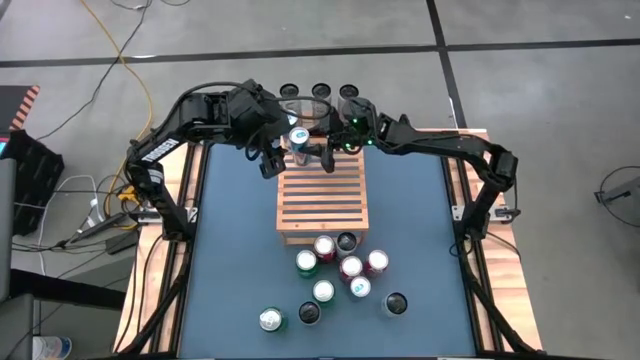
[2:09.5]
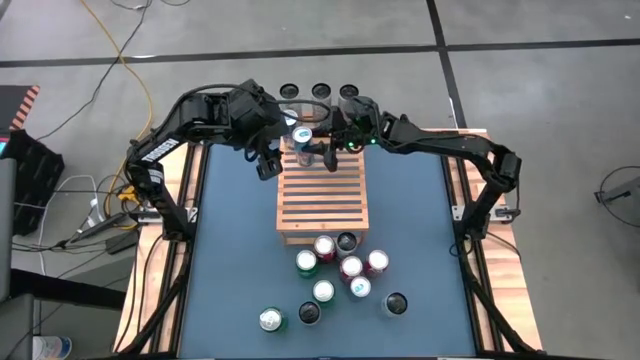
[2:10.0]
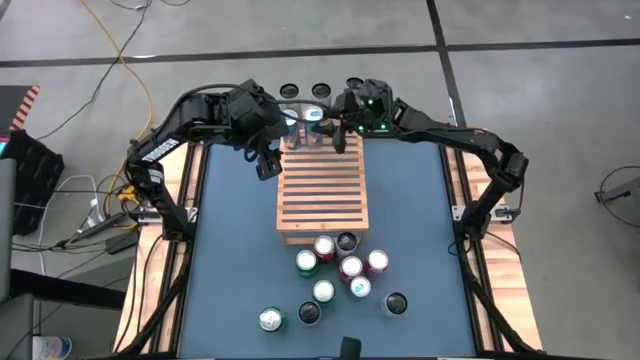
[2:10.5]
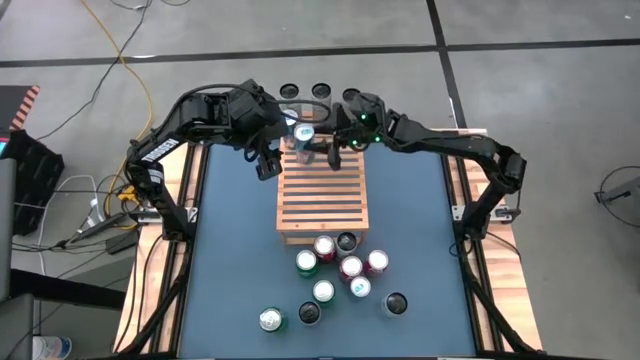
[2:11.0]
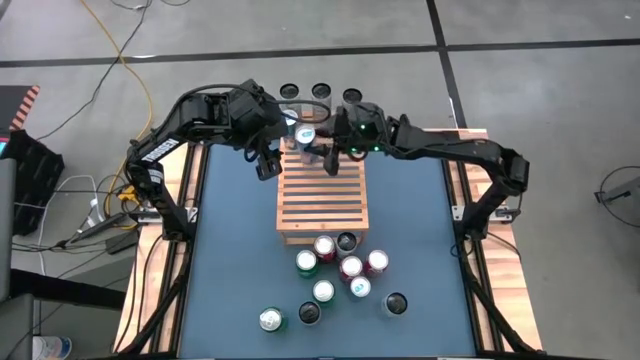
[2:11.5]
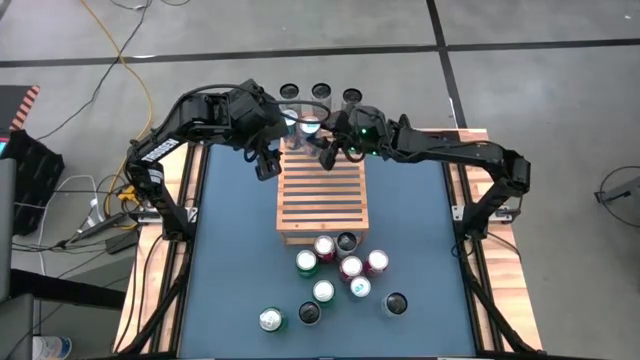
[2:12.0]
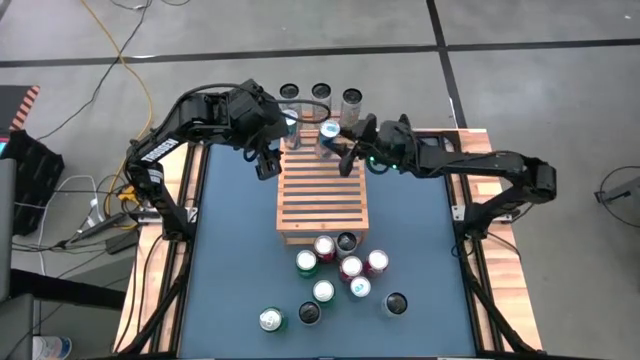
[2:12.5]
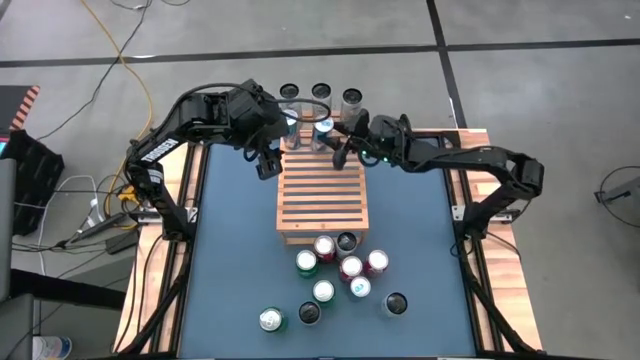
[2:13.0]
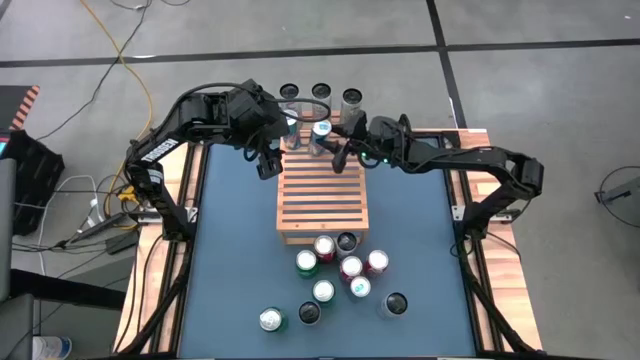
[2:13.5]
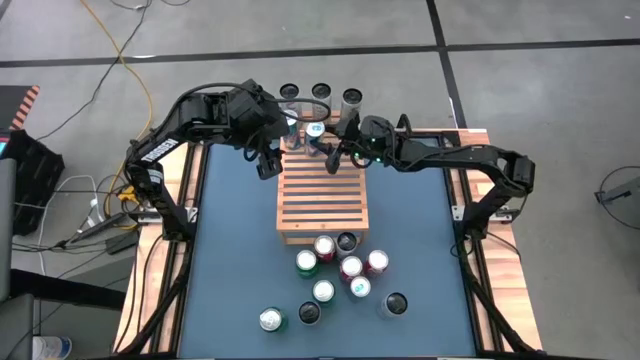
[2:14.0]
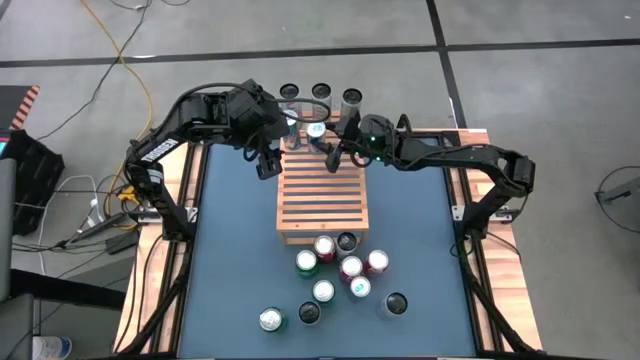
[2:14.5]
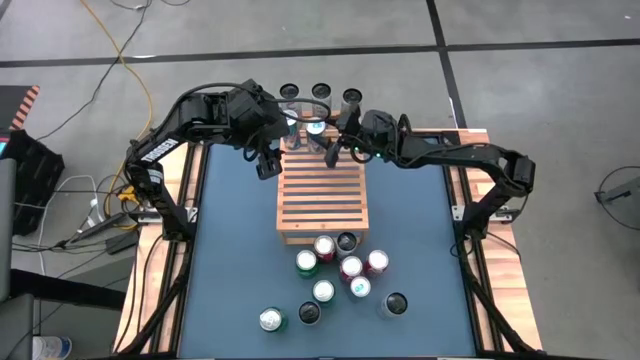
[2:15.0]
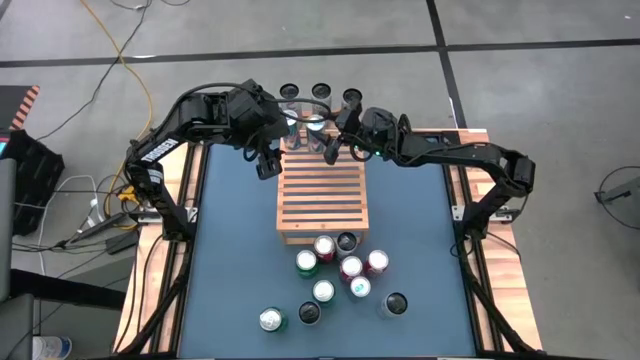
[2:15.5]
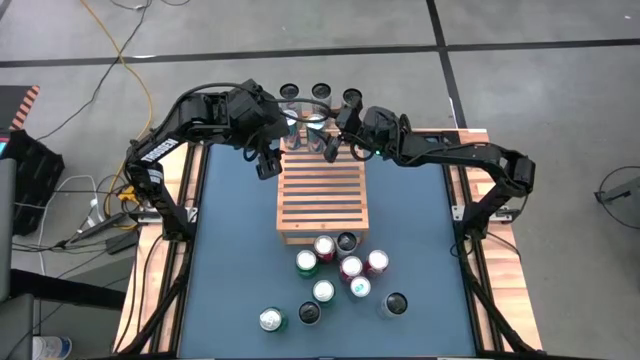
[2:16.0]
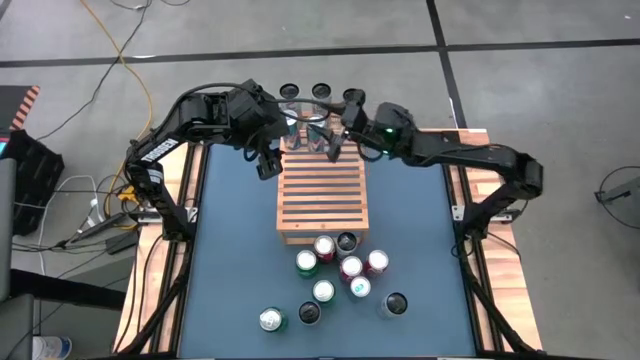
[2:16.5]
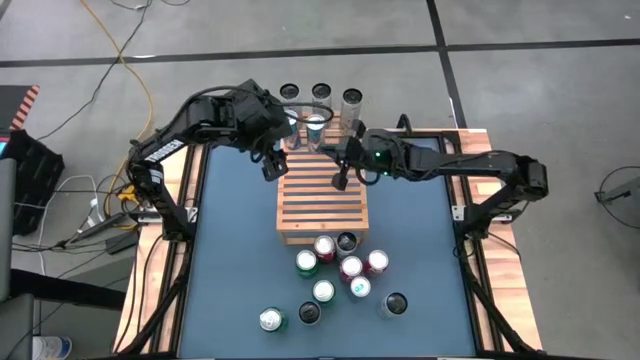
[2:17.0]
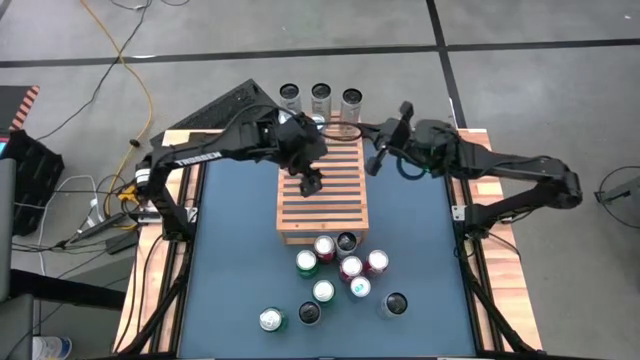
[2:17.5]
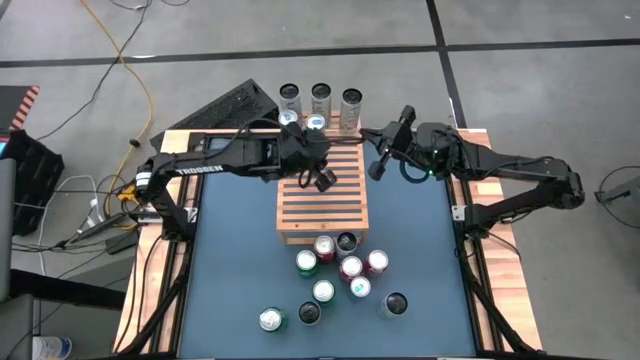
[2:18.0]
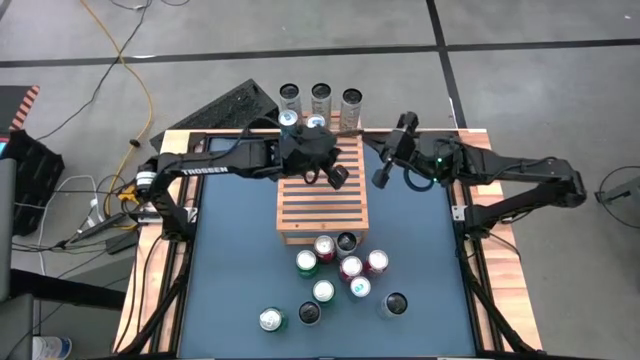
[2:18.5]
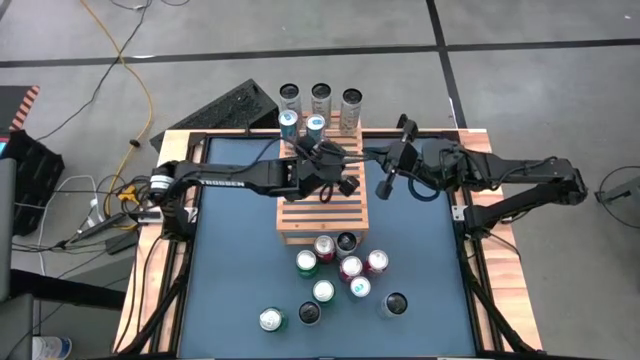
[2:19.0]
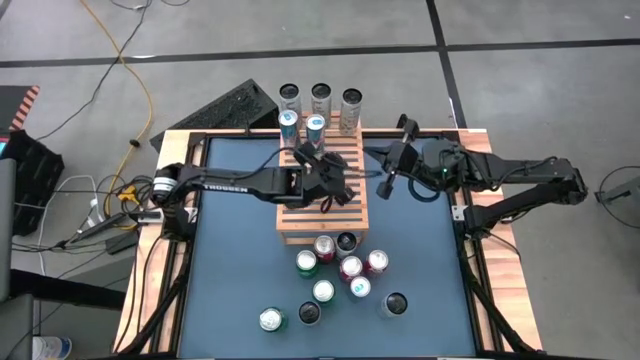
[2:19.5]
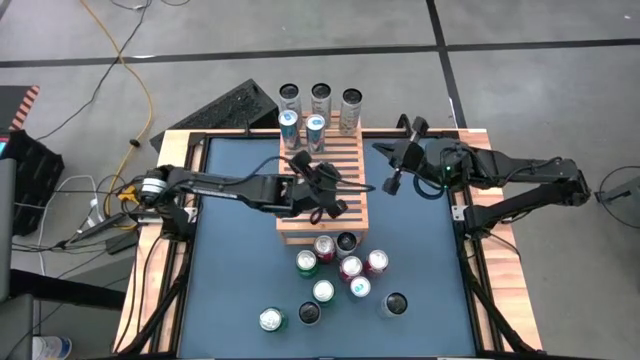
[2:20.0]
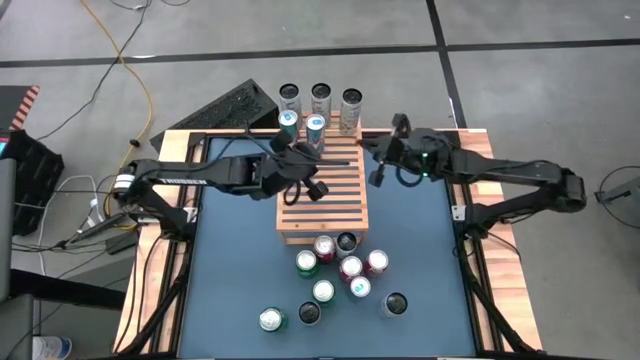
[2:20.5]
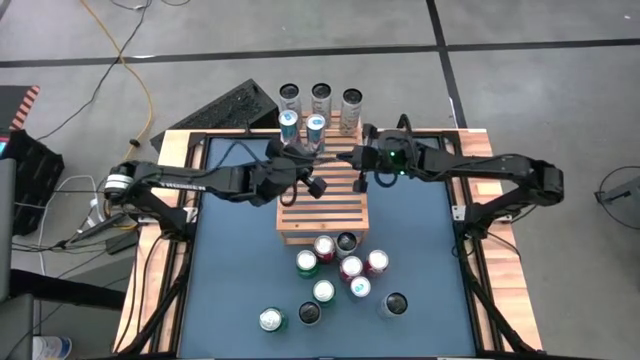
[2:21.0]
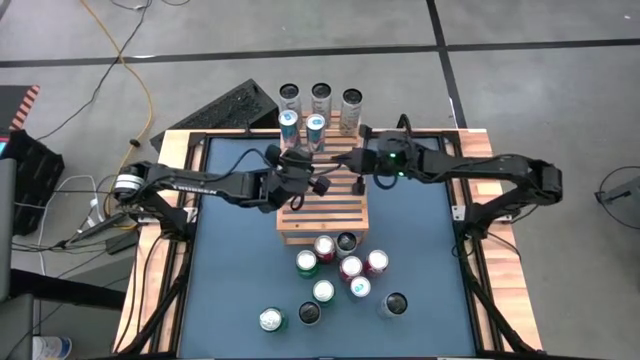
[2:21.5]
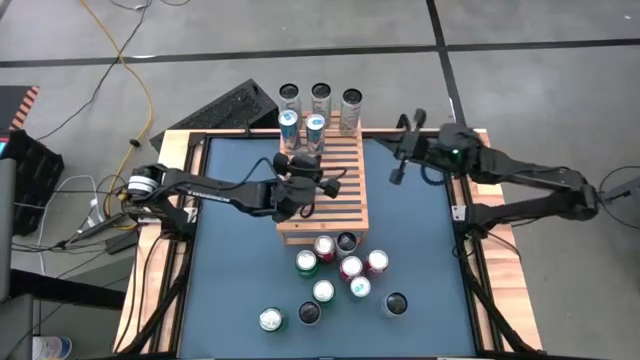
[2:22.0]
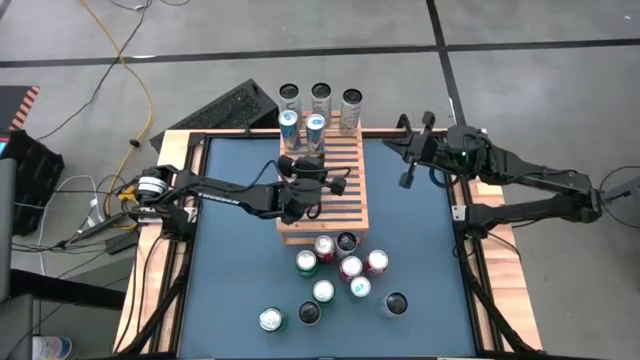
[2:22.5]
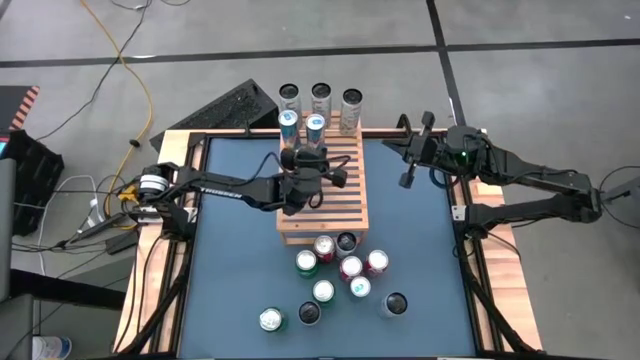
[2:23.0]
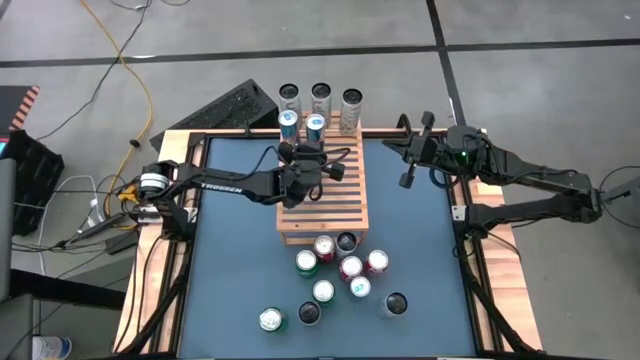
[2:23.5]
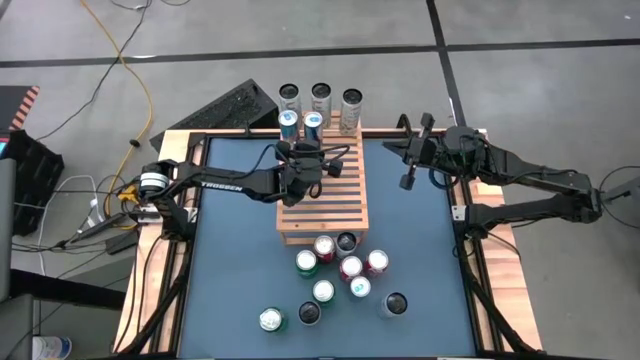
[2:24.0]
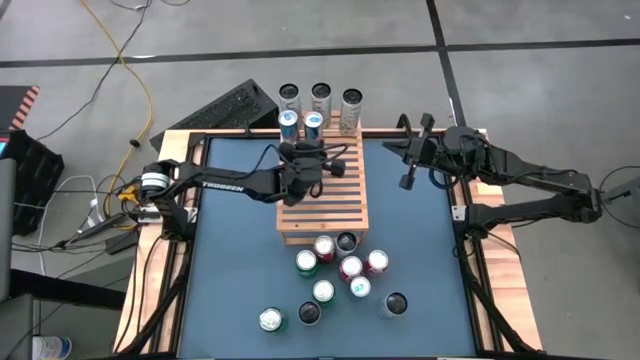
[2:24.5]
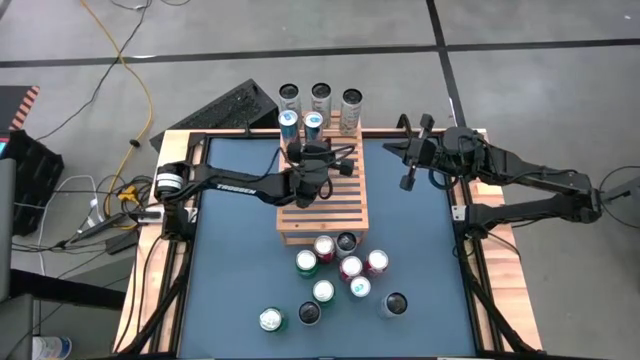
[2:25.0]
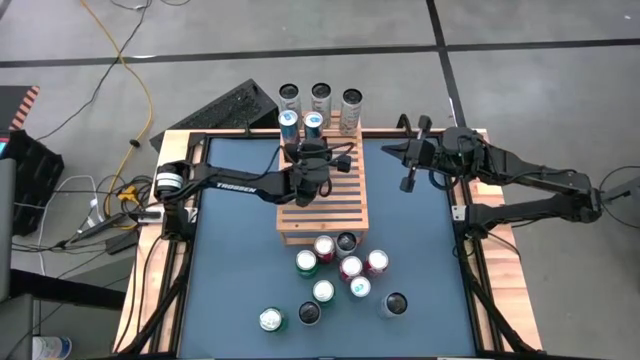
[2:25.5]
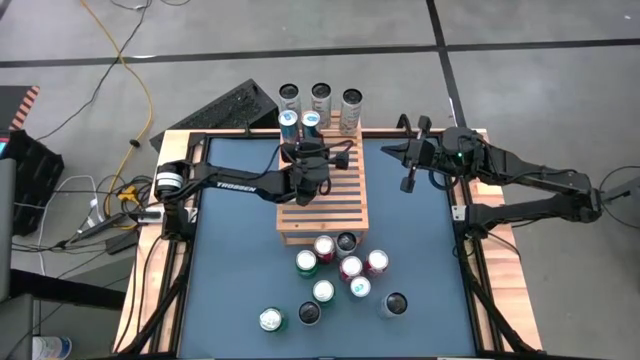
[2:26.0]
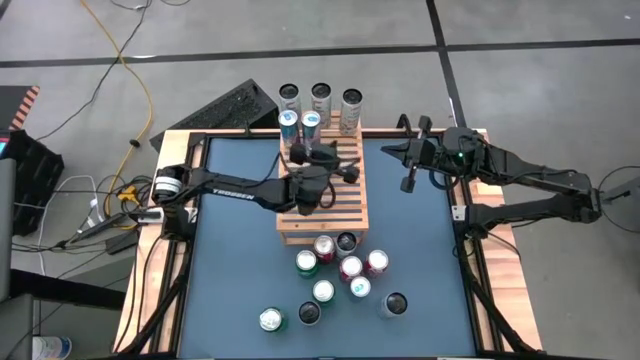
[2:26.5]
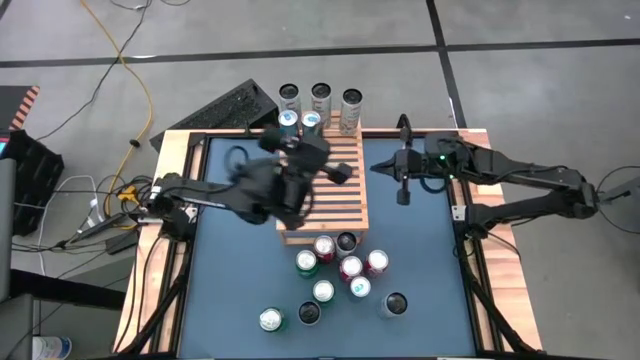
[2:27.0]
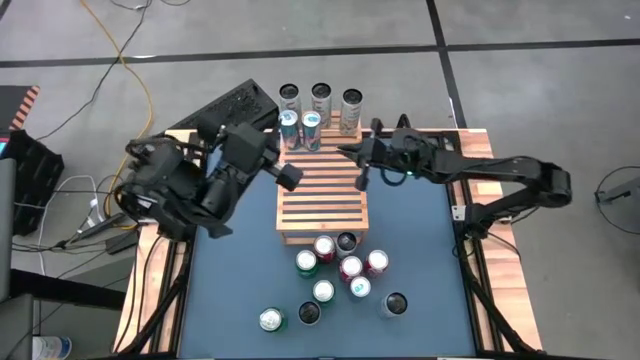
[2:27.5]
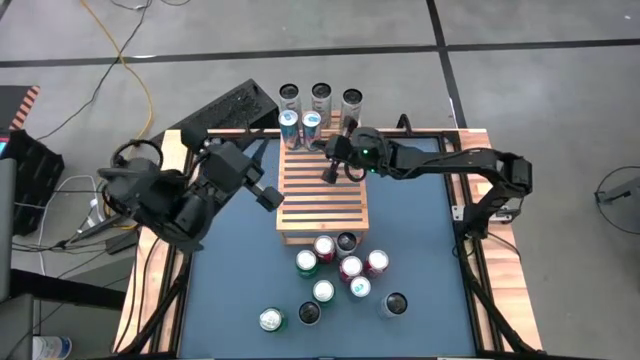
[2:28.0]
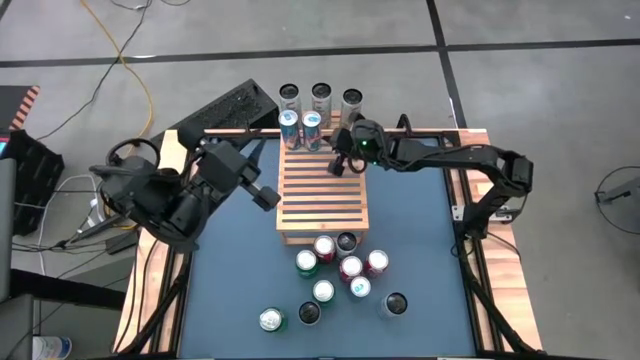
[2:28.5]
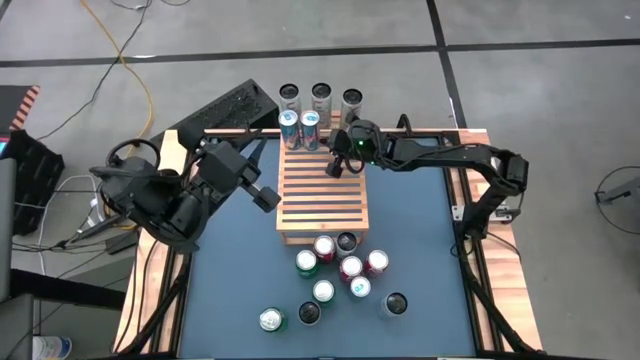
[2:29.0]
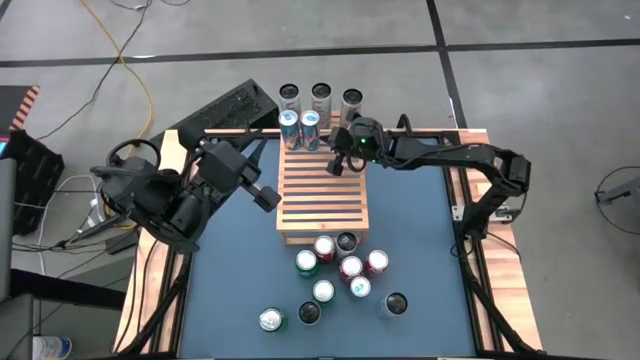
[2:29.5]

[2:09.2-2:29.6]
Task: Place canned beverage on shelf
Put the left blue soda can on the shelf aligned with the other blue soda cans
